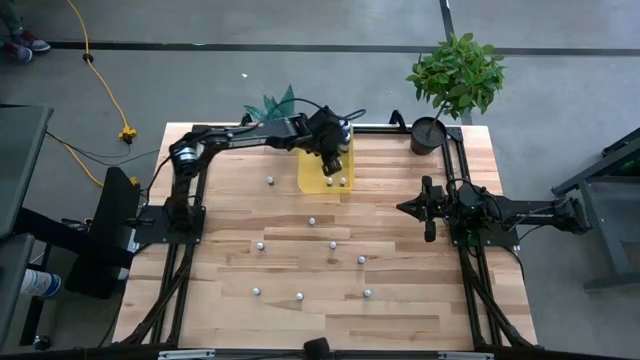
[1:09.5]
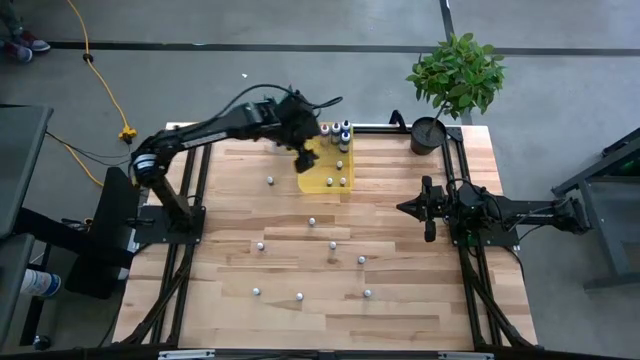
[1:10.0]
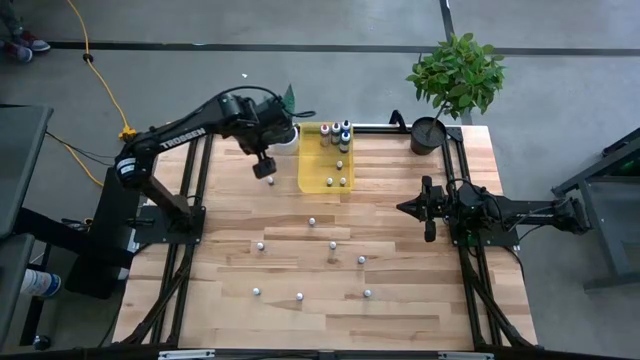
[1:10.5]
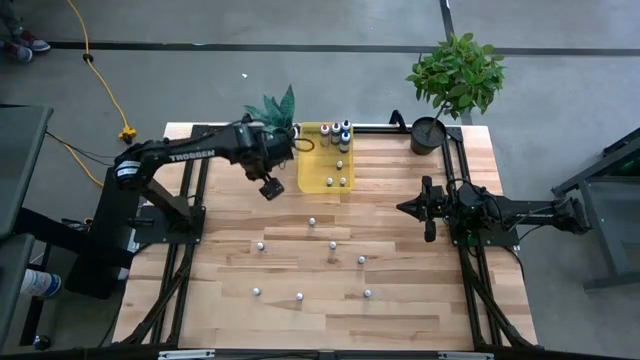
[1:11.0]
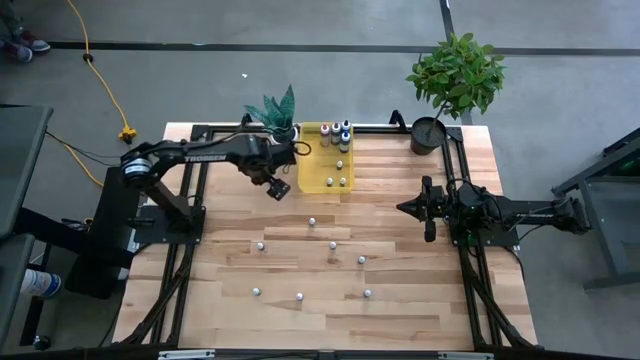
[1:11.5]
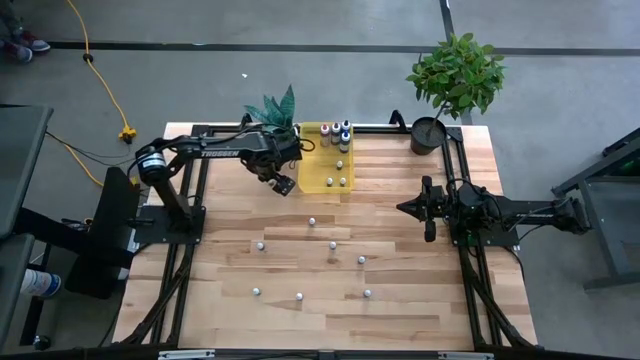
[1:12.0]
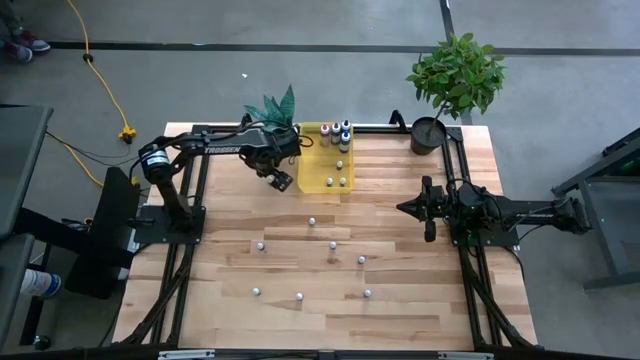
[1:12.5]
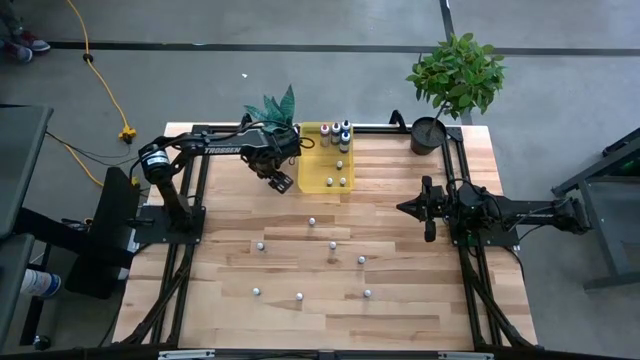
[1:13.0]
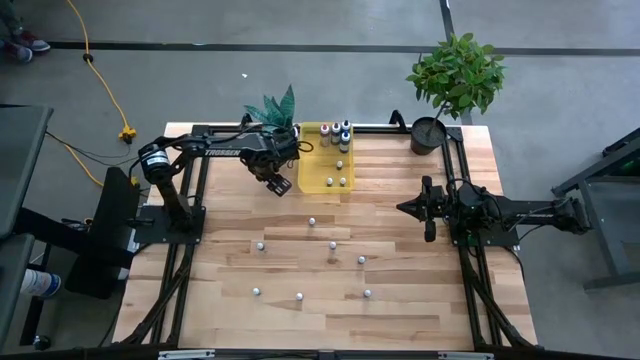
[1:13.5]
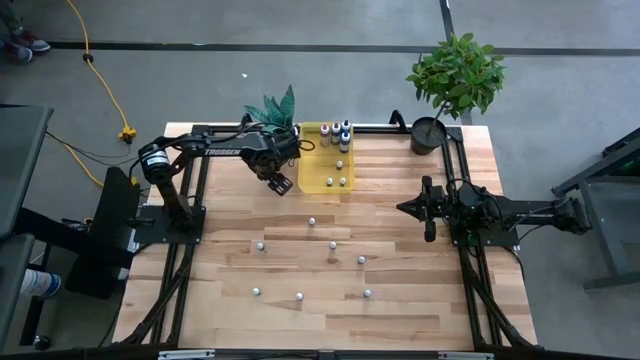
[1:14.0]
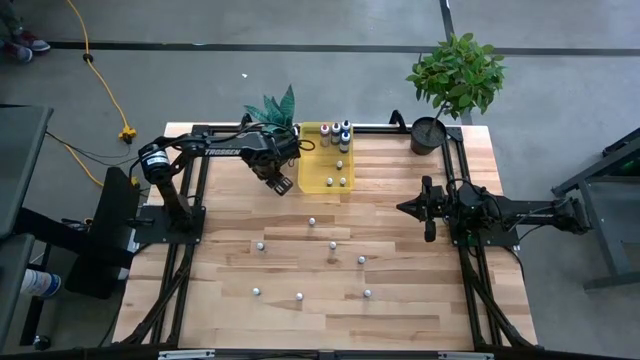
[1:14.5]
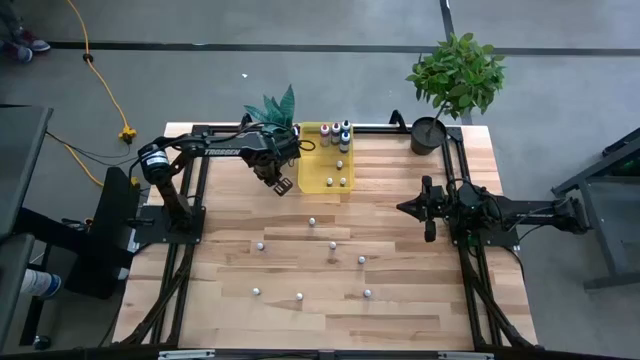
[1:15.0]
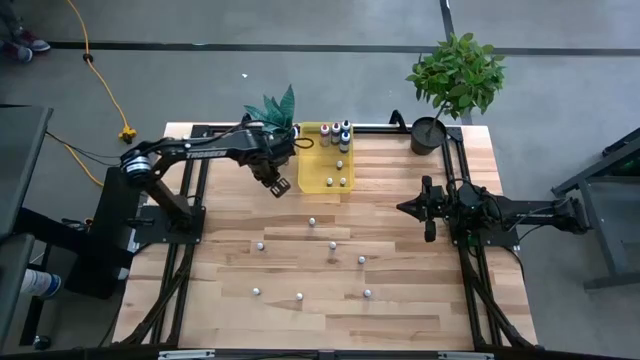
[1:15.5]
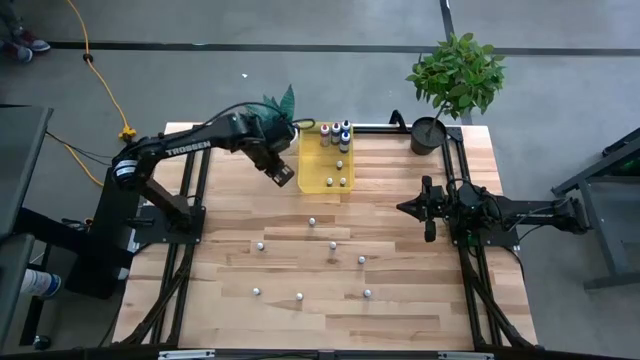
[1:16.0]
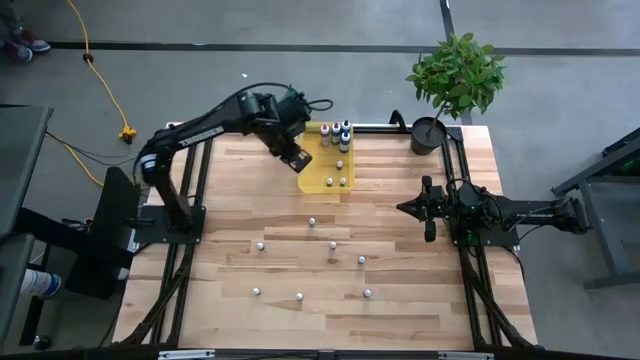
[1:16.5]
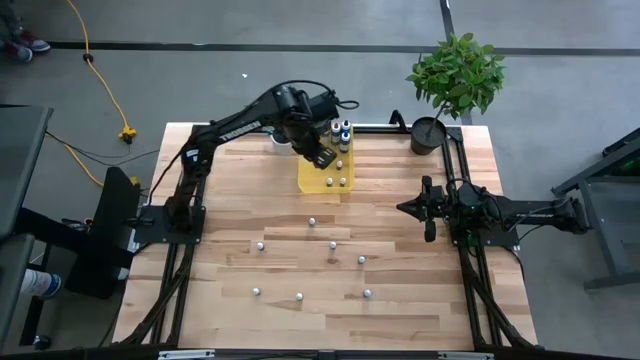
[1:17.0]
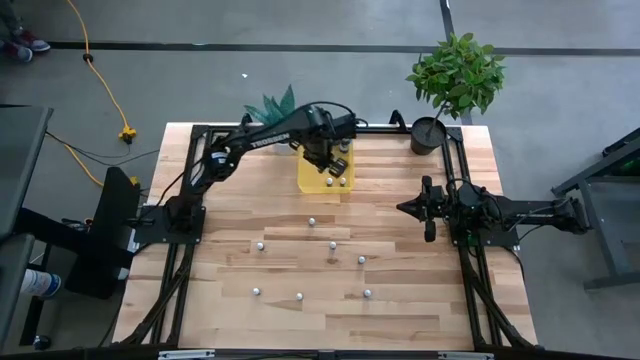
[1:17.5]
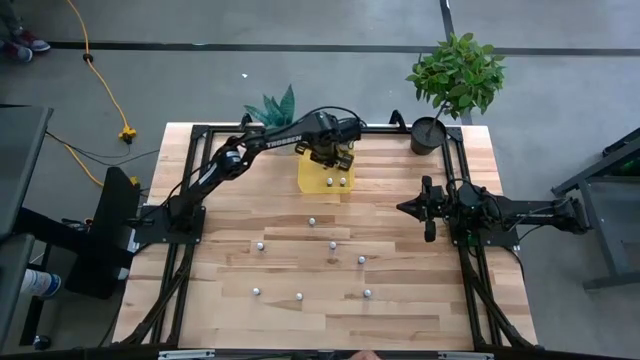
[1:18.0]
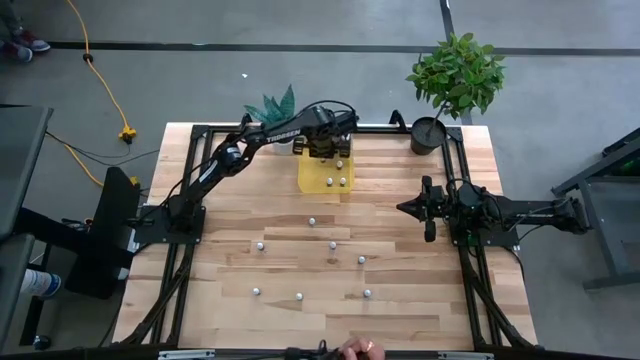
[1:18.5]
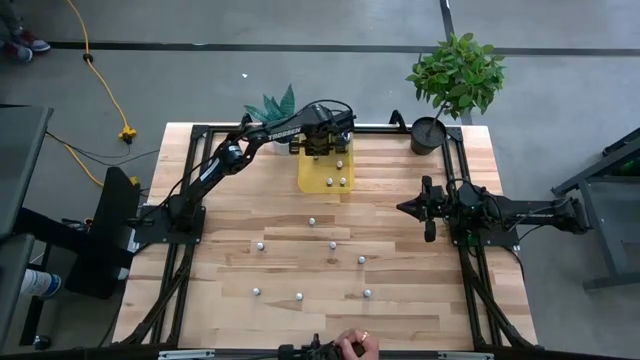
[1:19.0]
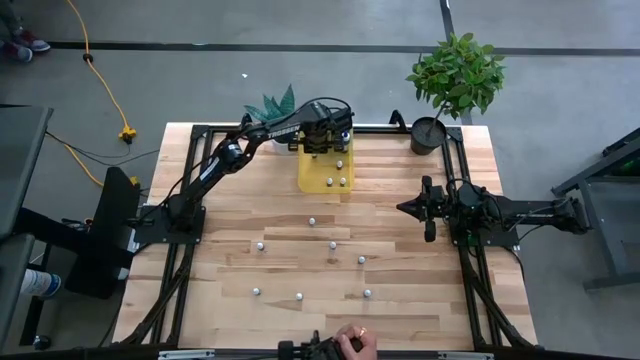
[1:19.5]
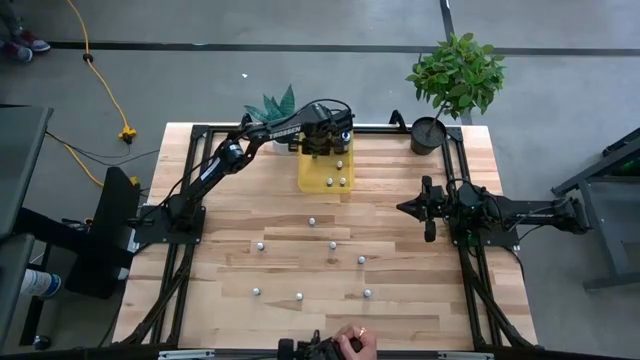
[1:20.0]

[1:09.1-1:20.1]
Task: Pick & Place food coloring
Put the small green food coloring bottle into the yellow bin

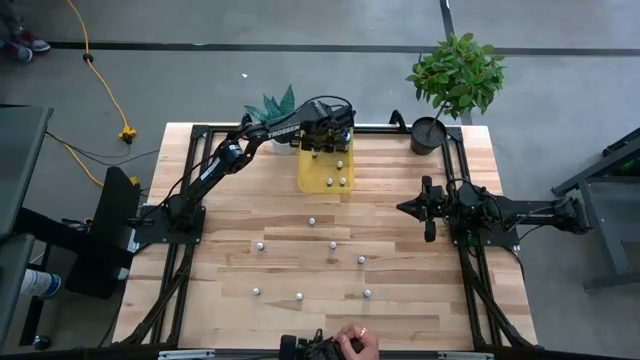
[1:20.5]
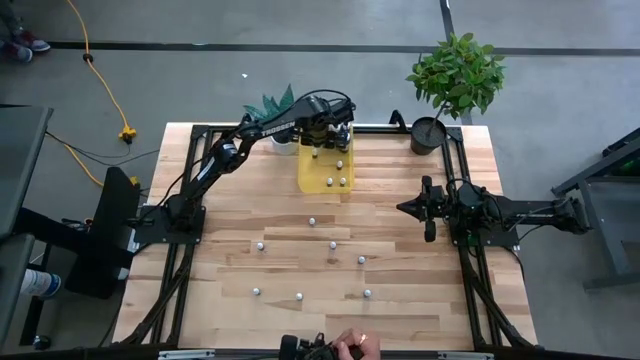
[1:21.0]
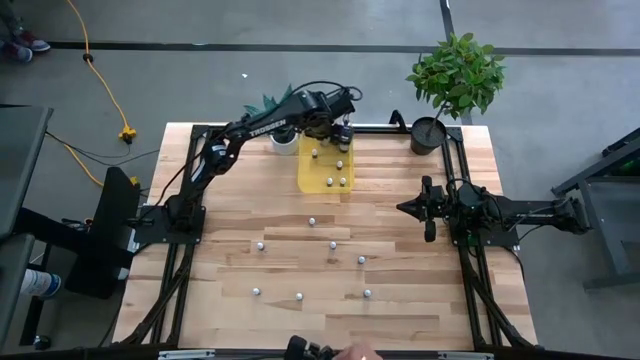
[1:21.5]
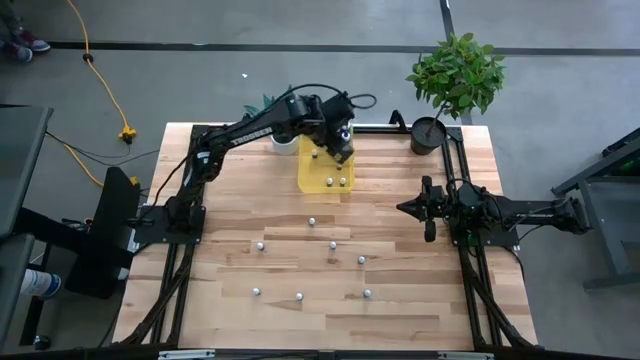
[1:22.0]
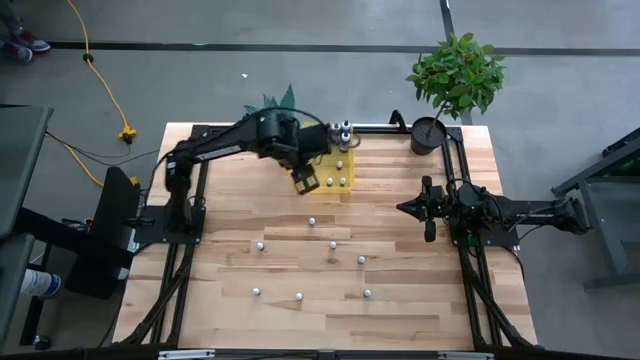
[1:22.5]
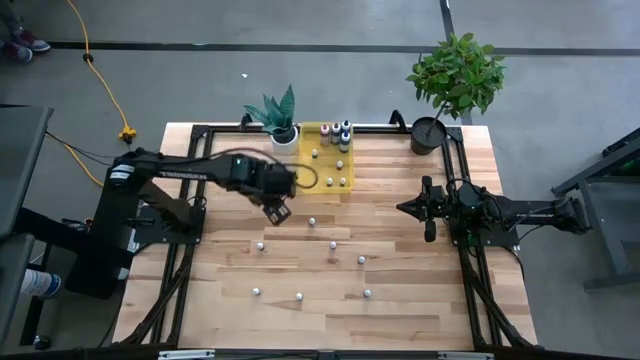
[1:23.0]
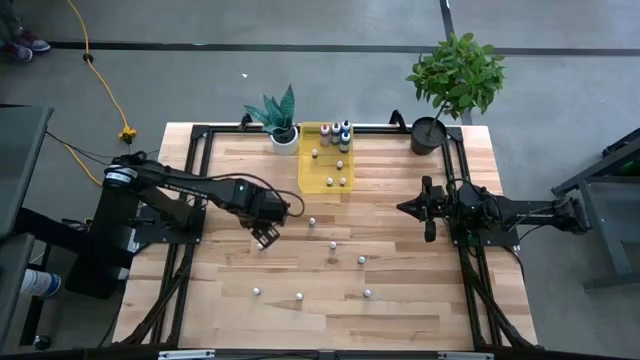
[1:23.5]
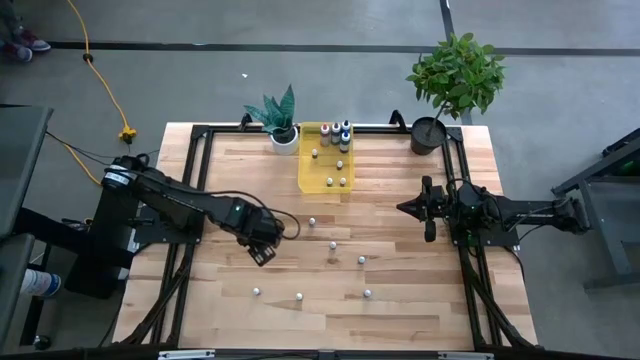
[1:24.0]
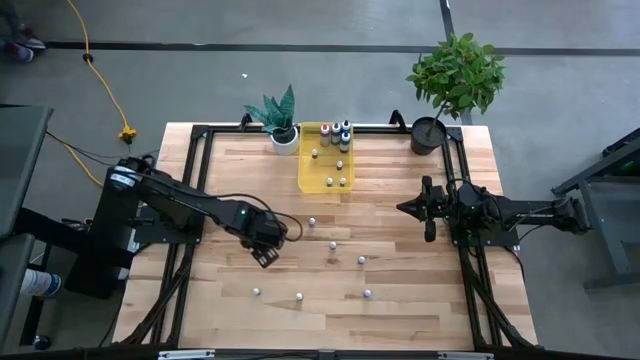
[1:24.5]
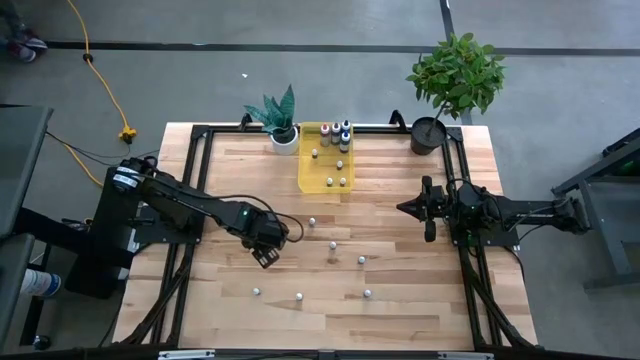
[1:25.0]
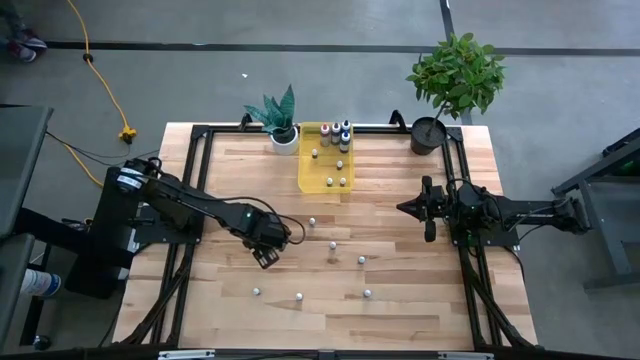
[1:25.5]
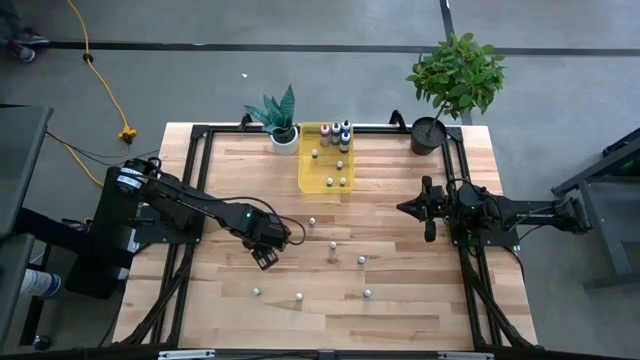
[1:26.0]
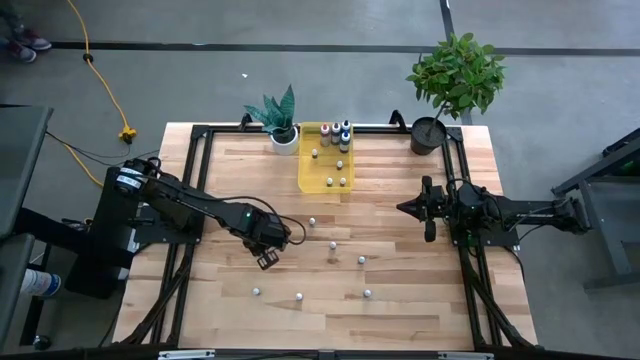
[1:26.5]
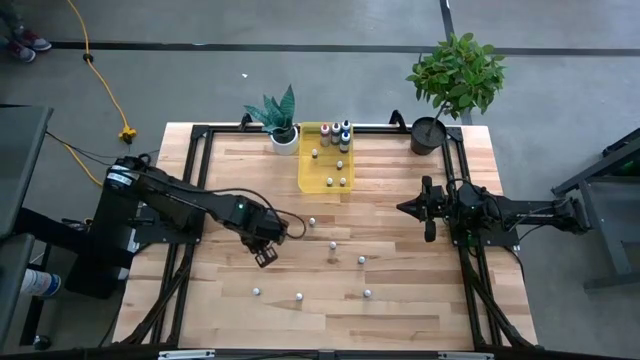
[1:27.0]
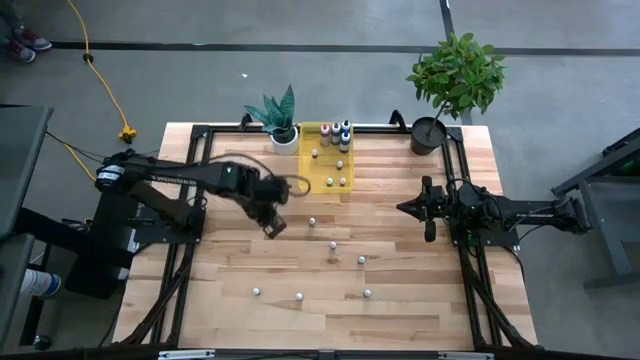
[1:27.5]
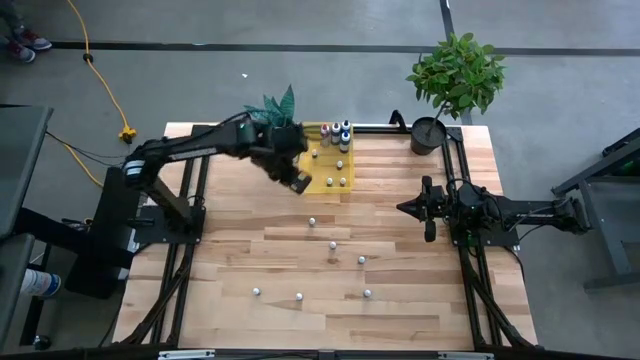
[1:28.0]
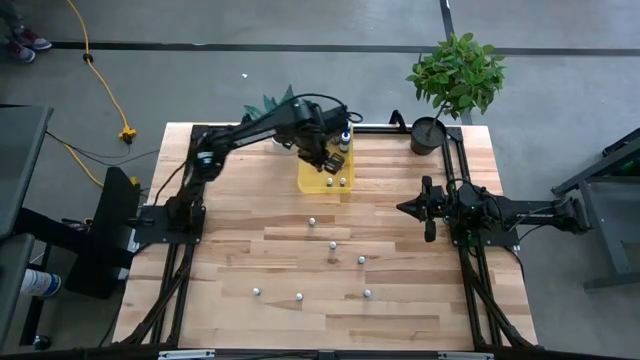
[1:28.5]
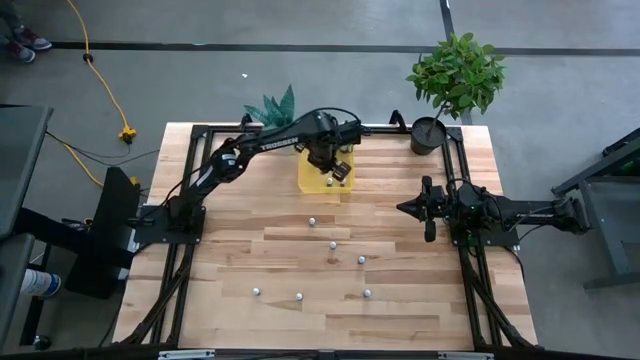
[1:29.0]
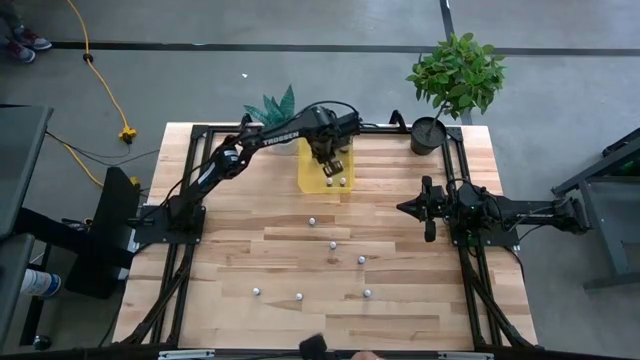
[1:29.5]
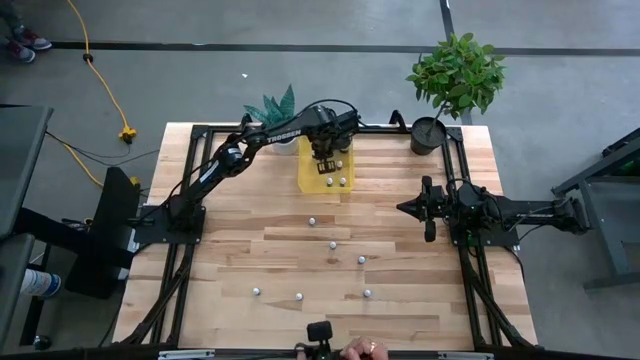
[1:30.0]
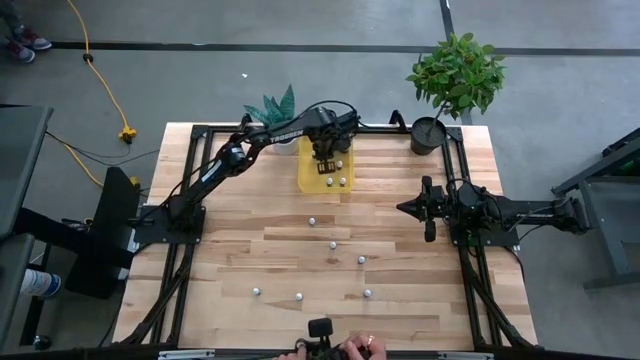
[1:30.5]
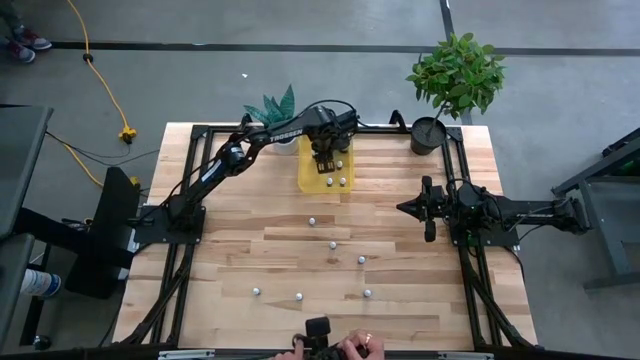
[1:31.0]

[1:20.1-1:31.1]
Put the small black food coloring bottle into the yellow bin
